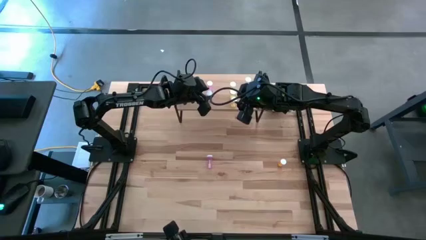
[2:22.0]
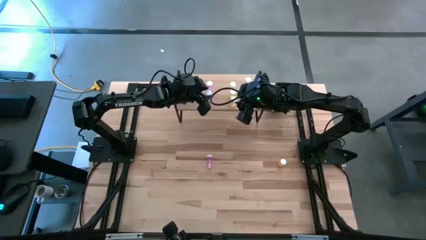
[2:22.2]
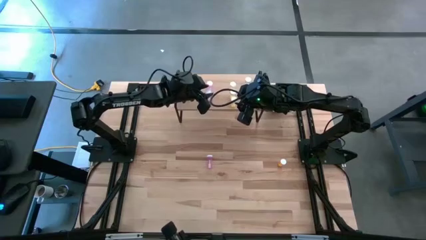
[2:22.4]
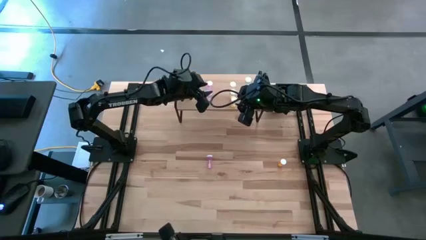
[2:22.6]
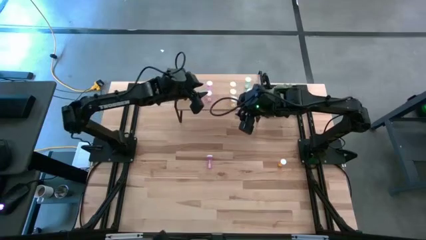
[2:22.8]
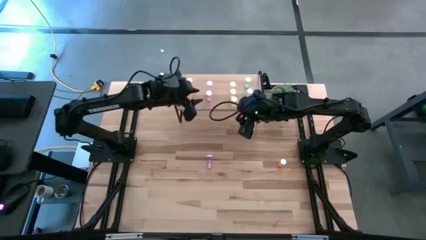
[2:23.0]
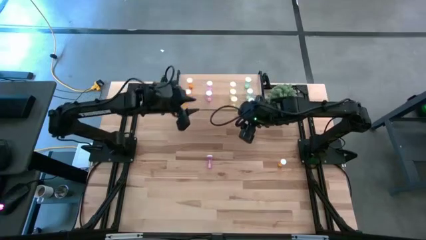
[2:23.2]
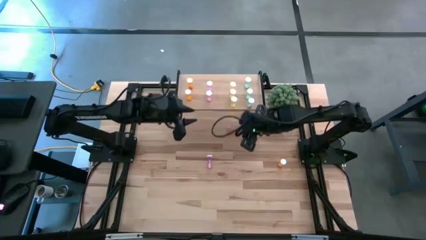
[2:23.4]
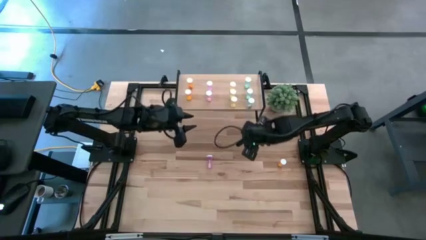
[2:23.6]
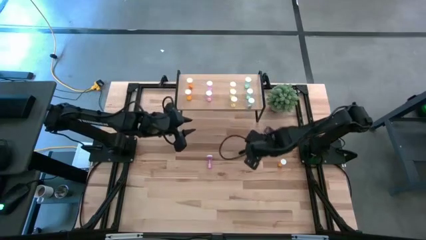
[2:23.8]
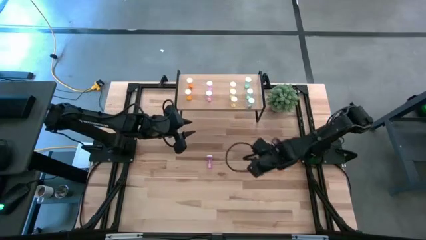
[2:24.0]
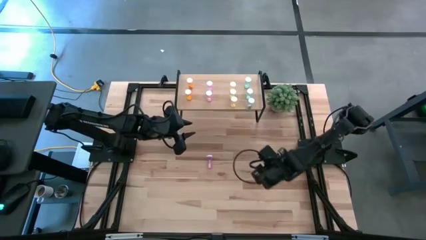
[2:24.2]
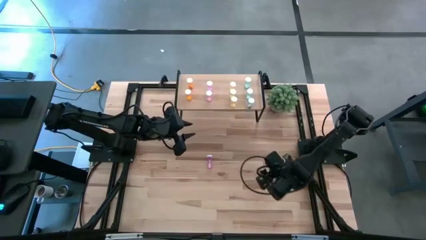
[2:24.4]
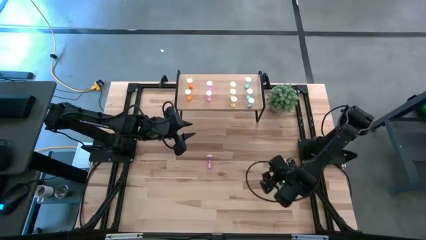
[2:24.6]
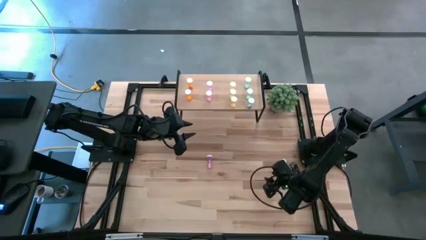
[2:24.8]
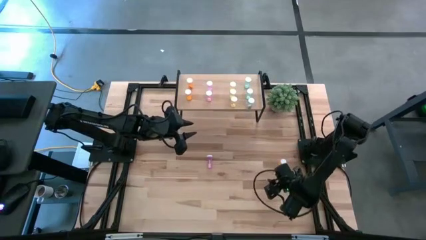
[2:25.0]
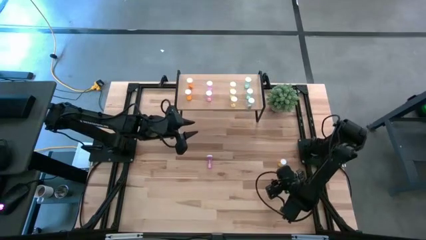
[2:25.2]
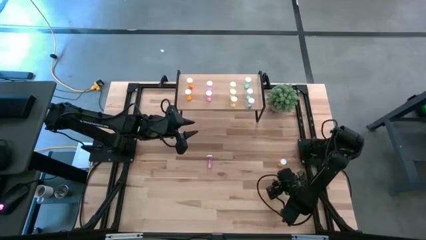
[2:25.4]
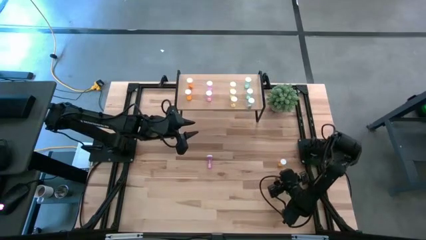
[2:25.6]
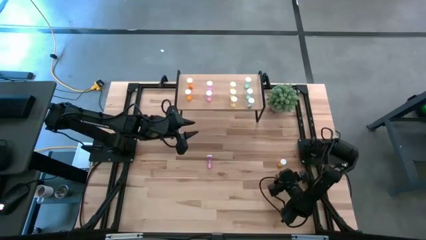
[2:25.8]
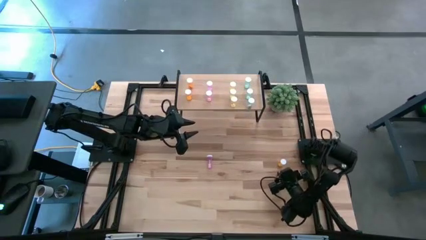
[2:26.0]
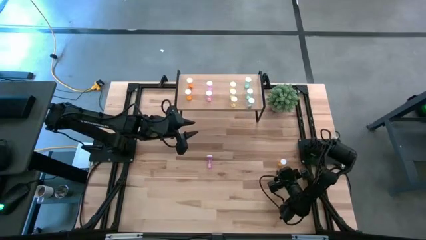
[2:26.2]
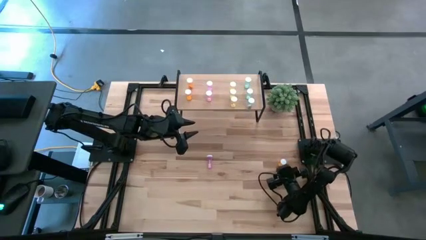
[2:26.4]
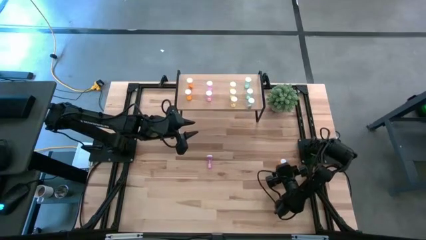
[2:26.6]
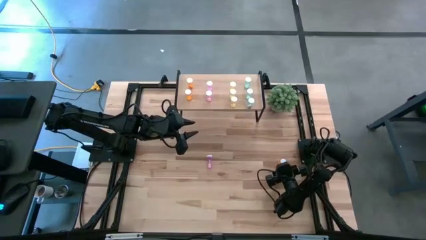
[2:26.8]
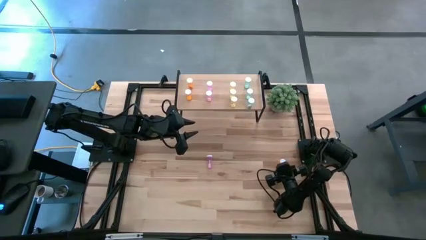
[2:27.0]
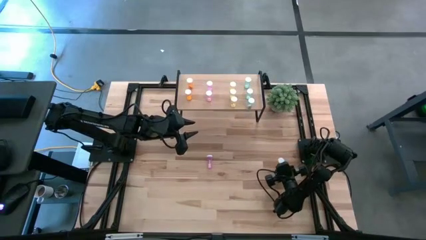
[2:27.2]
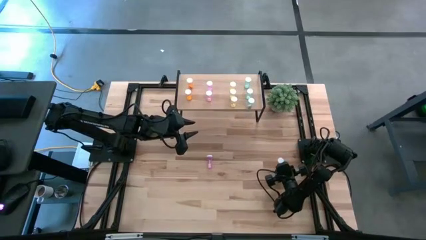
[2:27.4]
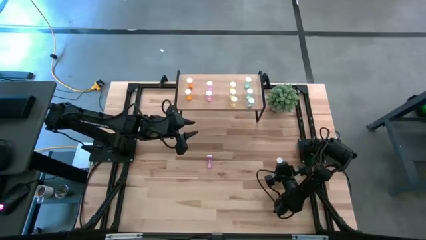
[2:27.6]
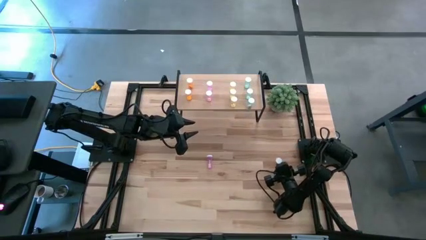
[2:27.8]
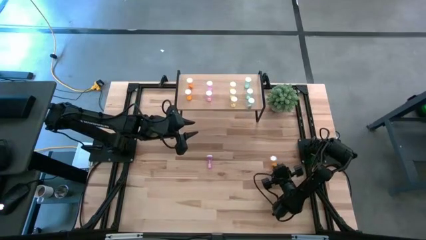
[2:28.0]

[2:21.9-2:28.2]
Task: Pick and place medicine bottles onto shelf by color
Put the orange pill bottle on the shelf aligned with the other orange pill bottle

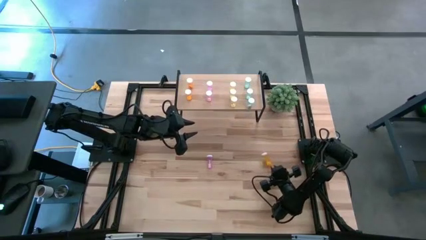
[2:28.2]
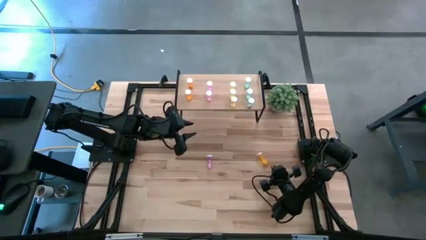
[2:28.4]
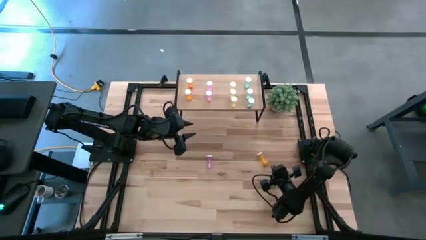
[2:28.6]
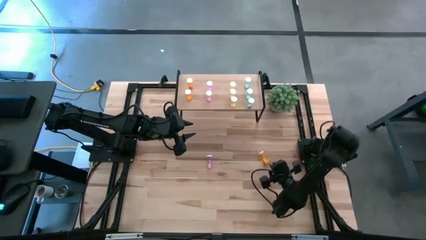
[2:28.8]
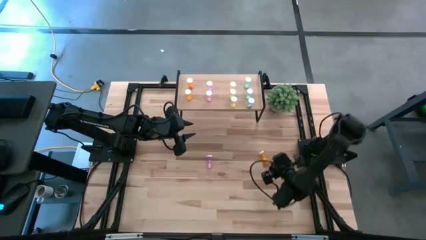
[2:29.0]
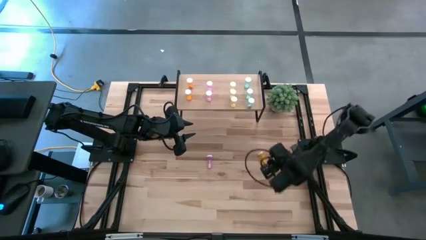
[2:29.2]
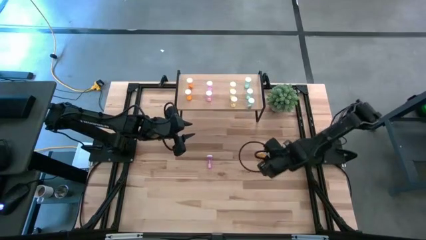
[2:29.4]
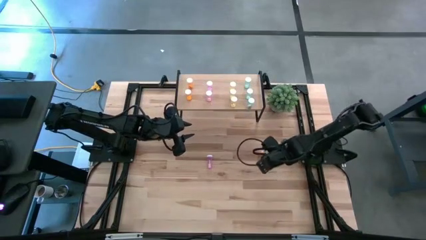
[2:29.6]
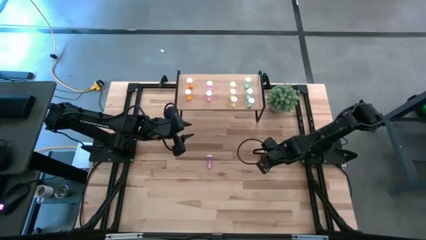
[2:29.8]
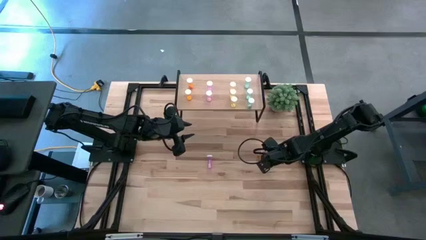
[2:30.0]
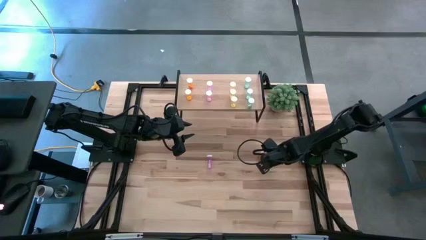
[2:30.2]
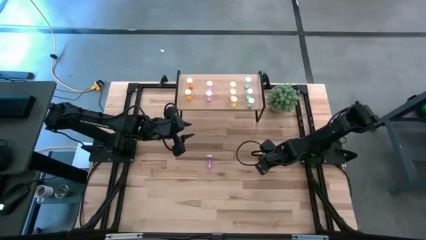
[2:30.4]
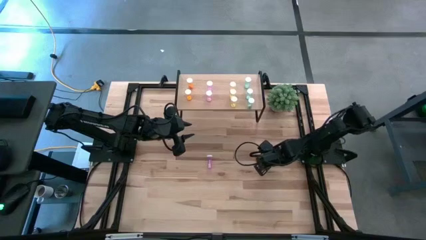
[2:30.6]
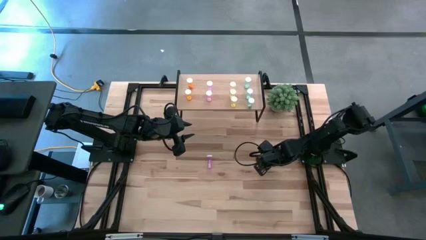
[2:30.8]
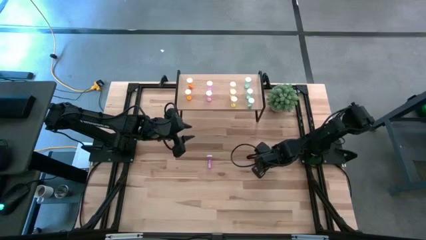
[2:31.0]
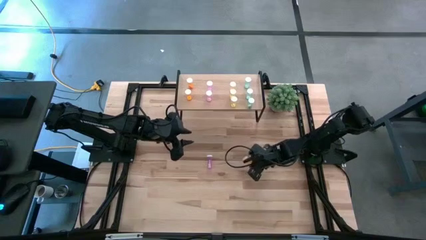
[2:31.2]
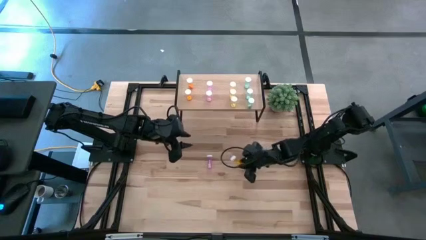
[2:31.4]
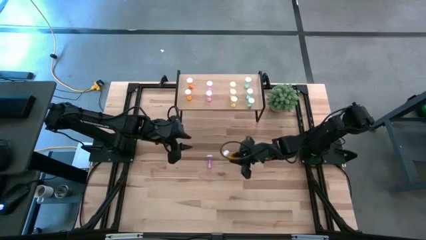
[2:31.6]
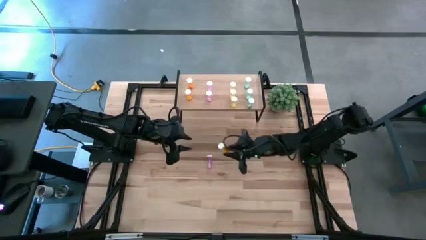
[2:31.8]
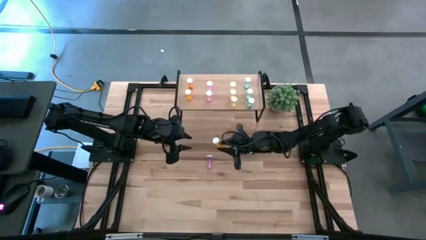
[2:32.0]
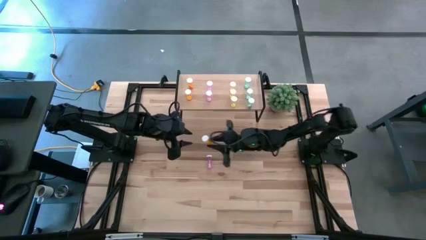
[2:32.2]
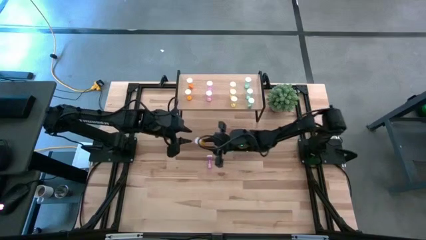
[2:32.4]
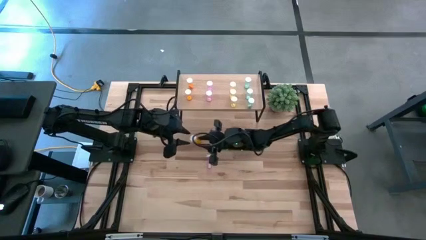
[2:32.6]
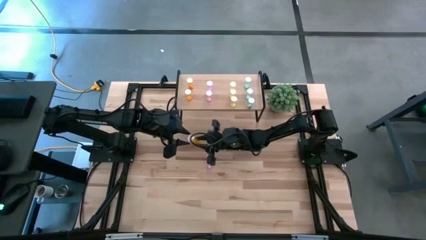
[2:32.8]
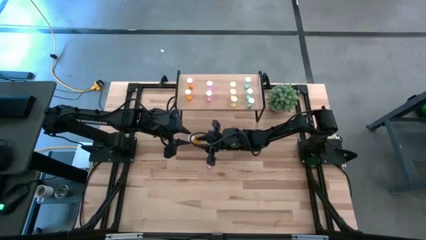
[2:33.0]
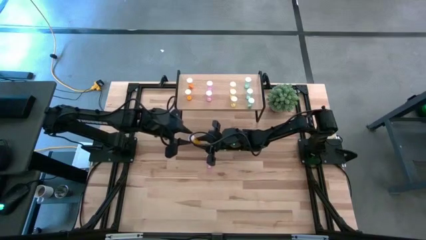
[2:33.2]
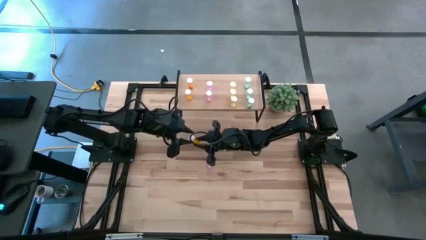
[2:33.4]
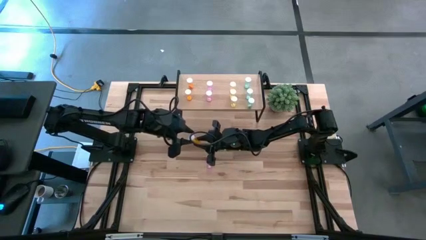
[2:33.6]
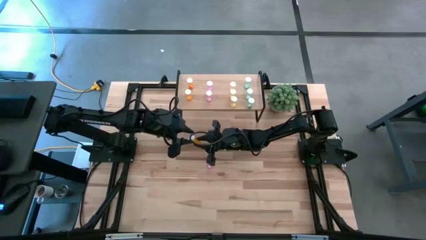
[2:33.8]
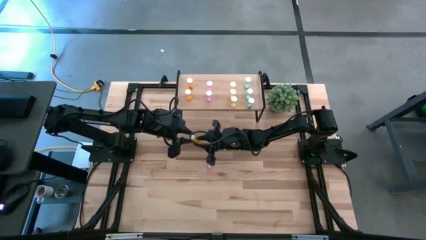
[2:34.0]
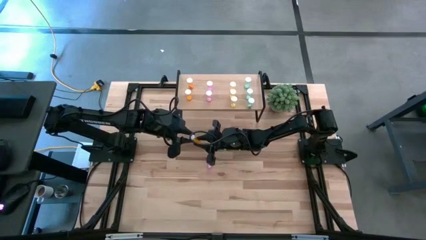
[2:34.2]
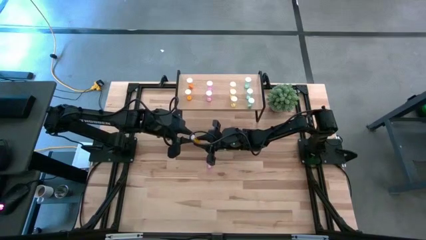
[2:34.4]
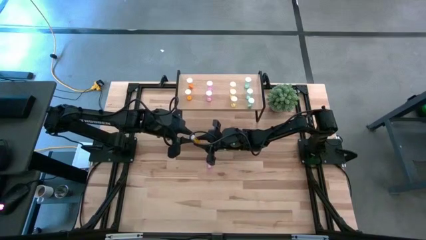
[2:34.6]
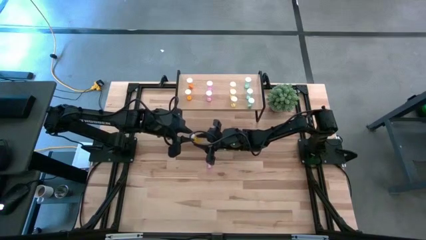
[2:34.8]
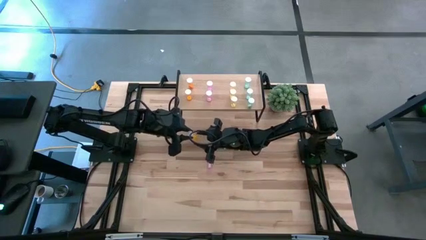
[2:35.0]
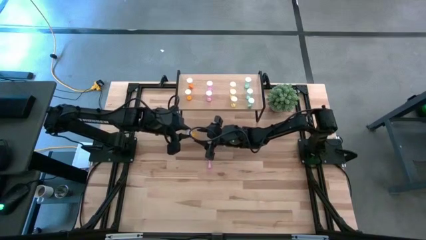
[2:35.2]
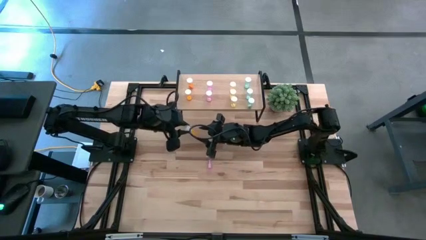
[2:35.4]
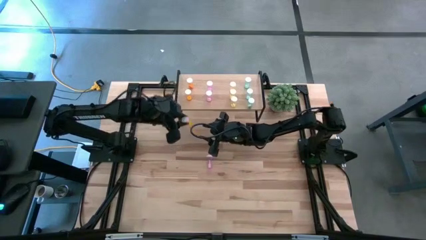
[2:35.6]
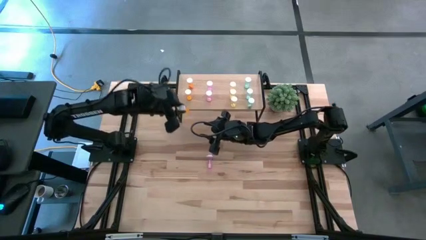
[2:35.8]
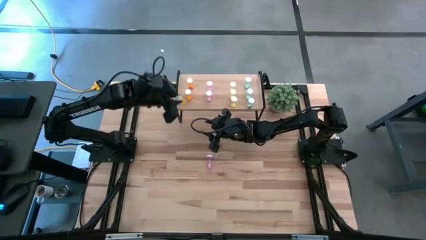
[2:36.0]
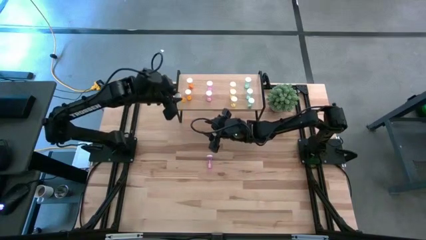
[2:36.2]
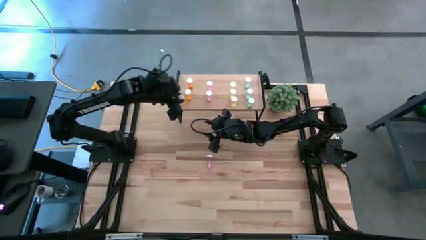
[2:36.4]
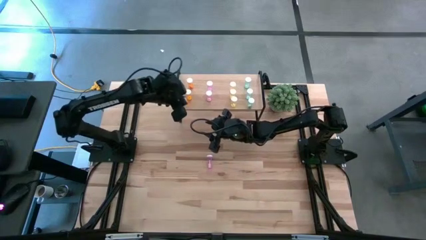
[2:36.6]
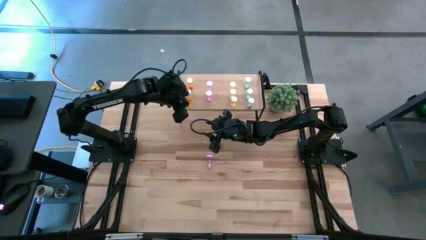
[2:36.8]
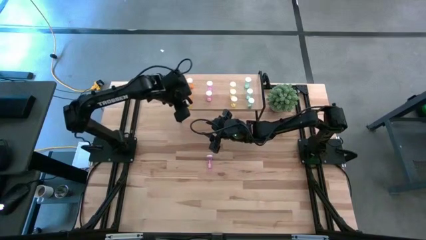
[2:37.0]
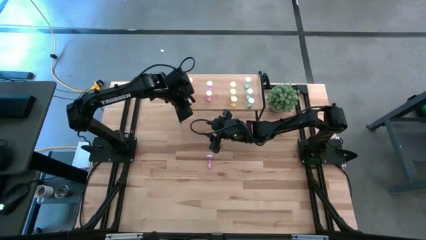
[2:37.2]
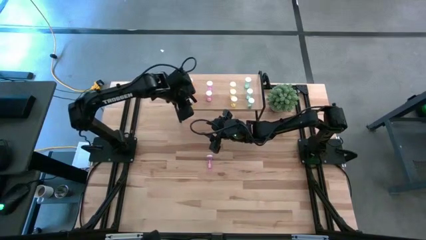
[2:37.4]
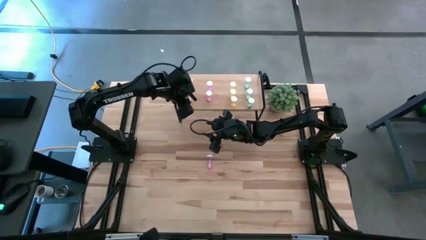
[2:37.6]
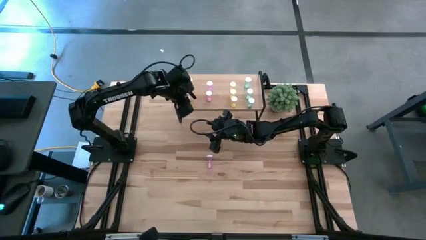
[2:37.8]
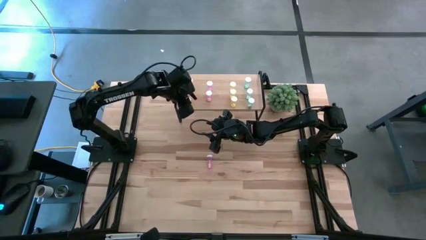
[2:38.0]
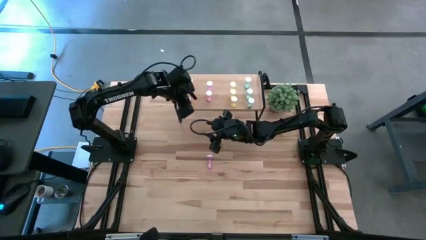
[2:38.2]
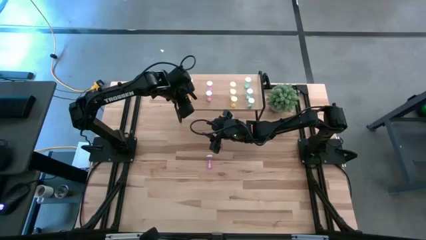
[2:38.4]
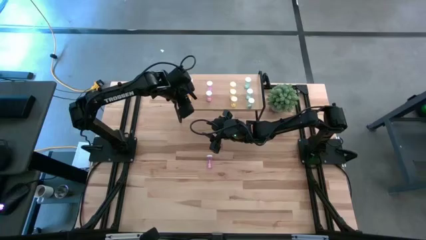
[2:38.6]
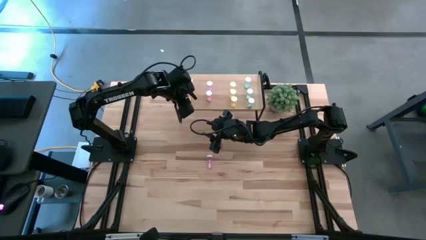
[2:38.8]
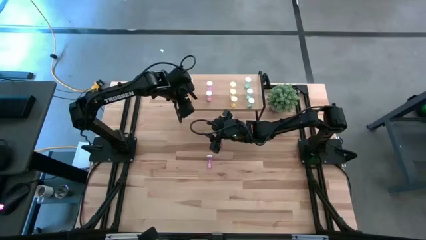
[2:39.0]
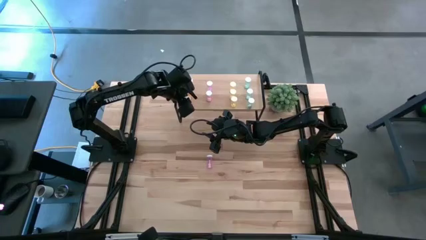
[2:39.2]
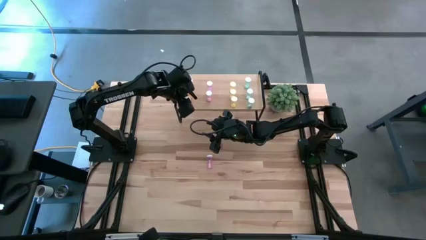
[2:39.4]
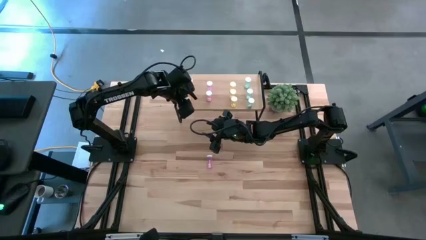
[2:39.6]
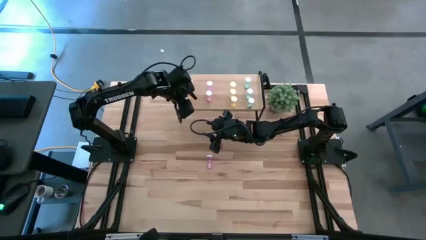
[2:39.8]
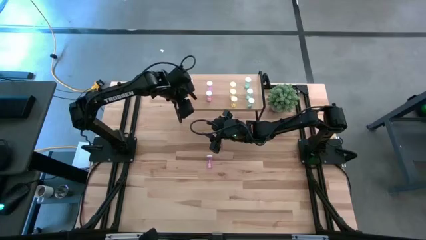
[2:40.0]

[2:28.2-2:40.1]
Put the orange pill bottle on the shelf aligned with the other orange pill bottles
